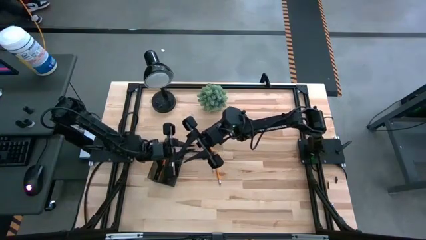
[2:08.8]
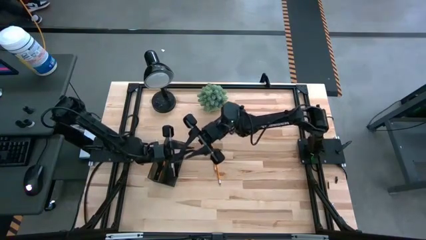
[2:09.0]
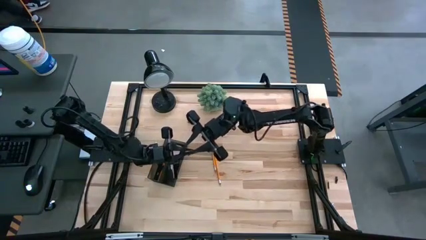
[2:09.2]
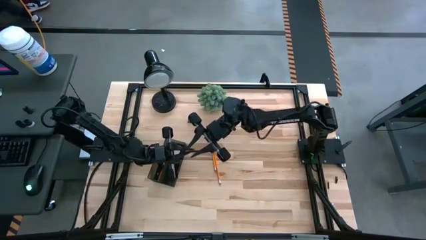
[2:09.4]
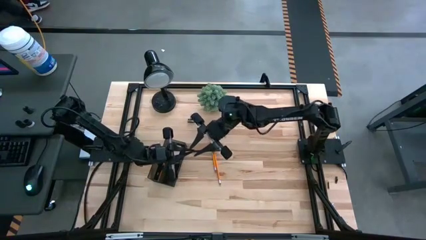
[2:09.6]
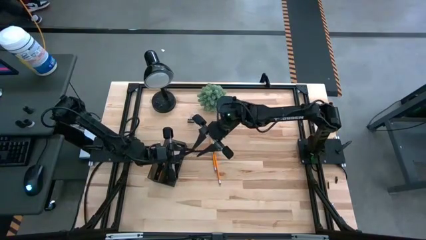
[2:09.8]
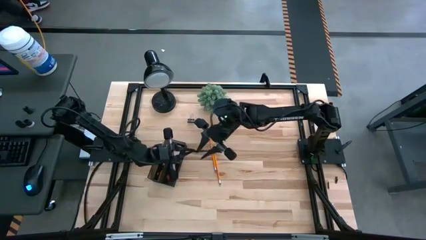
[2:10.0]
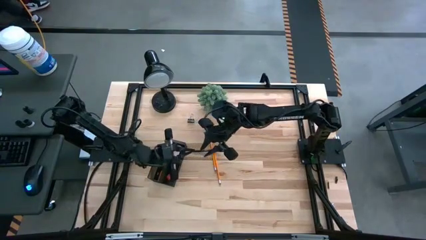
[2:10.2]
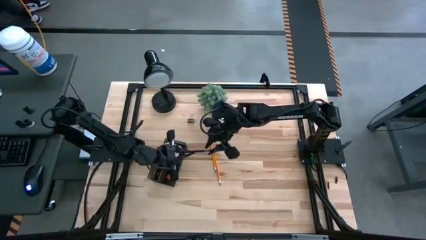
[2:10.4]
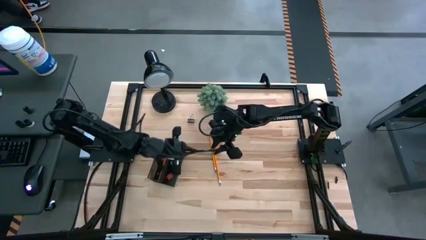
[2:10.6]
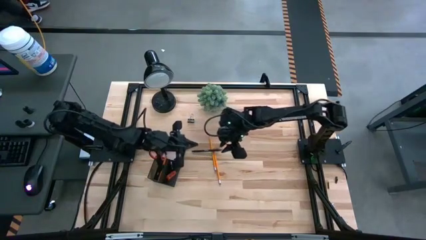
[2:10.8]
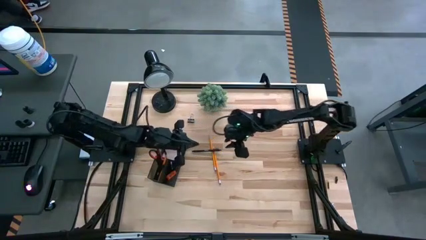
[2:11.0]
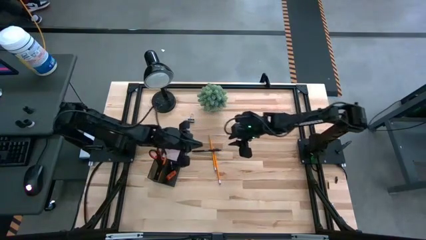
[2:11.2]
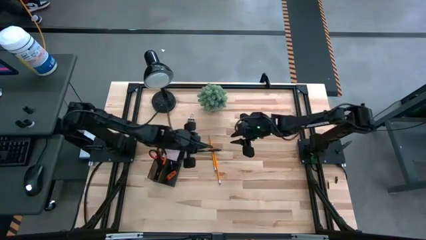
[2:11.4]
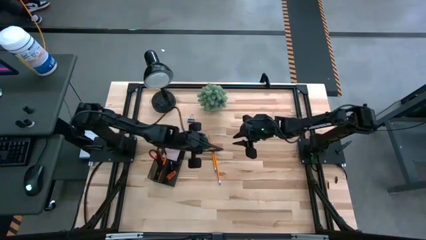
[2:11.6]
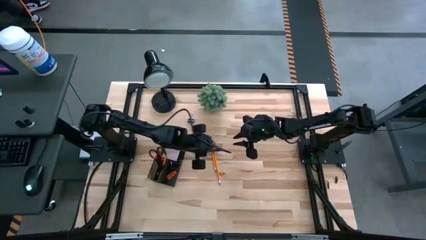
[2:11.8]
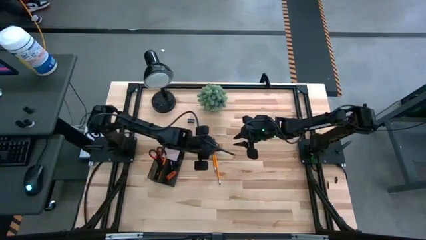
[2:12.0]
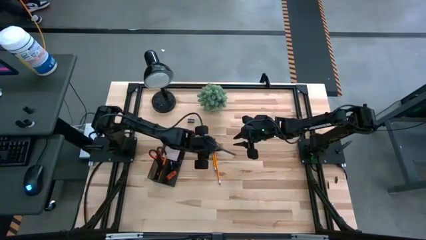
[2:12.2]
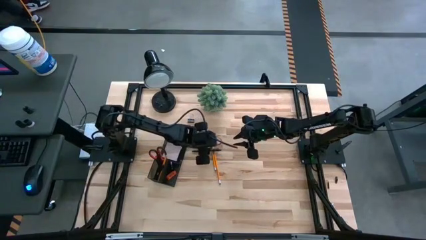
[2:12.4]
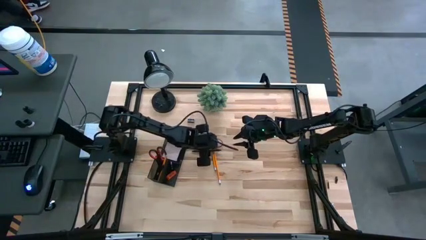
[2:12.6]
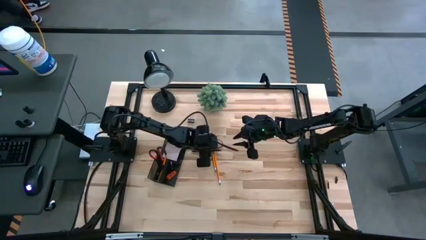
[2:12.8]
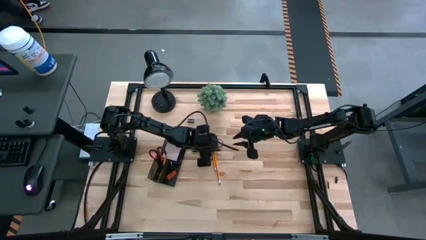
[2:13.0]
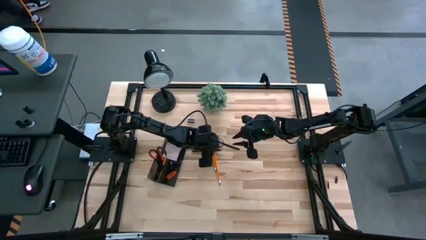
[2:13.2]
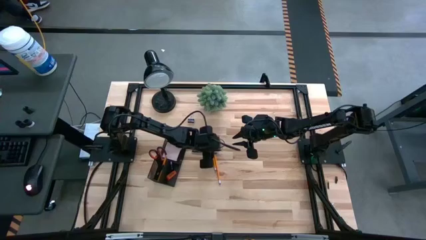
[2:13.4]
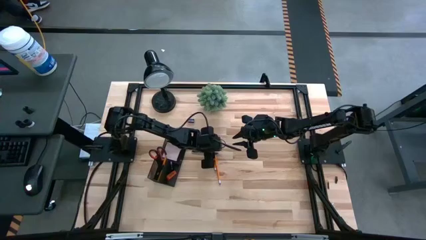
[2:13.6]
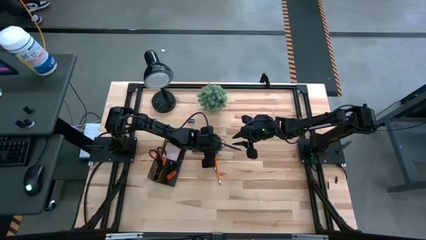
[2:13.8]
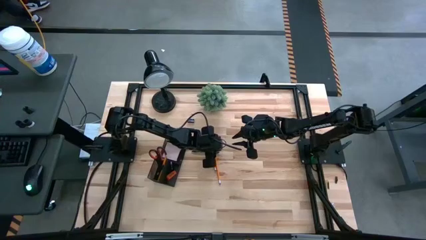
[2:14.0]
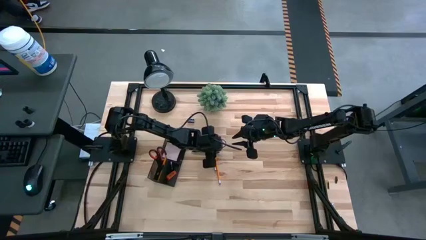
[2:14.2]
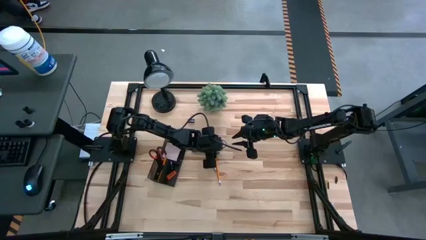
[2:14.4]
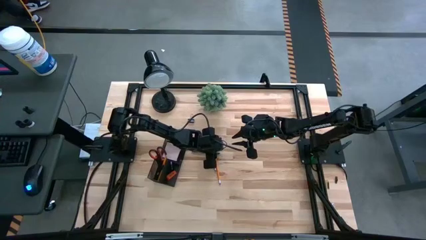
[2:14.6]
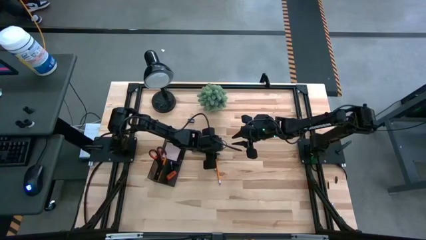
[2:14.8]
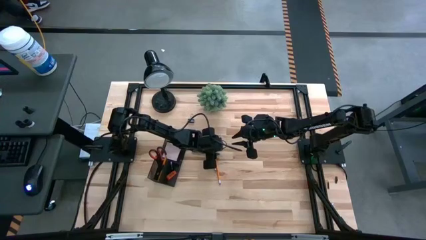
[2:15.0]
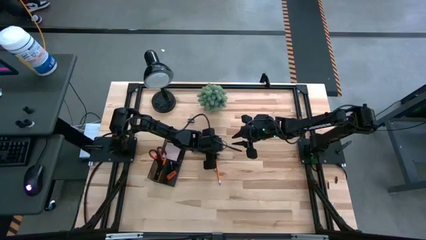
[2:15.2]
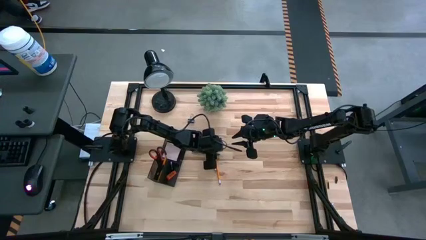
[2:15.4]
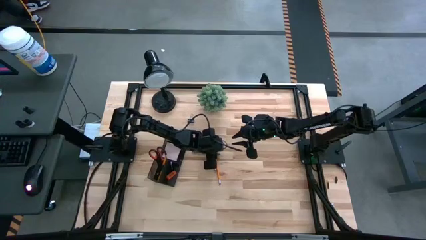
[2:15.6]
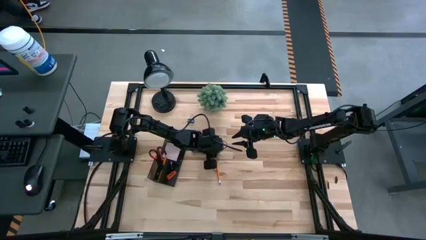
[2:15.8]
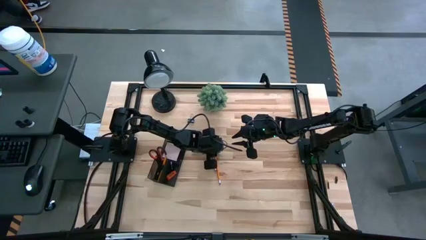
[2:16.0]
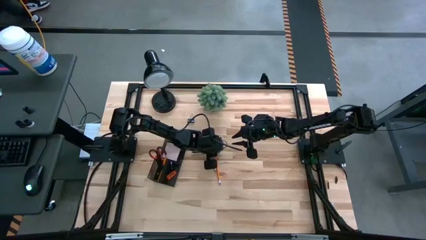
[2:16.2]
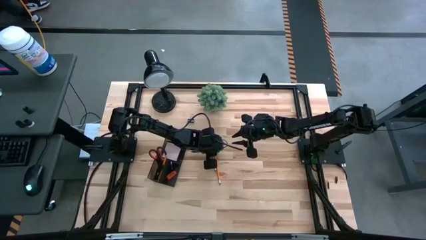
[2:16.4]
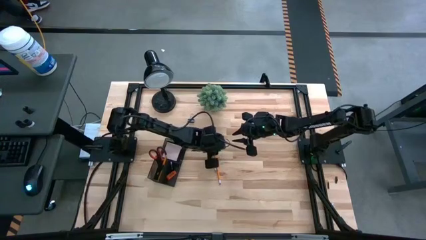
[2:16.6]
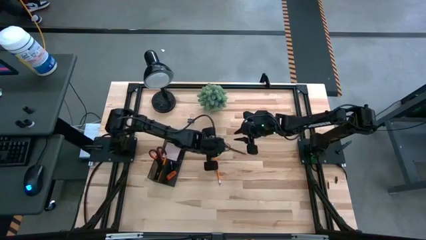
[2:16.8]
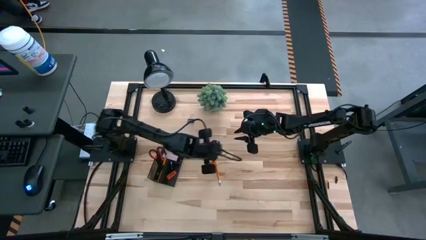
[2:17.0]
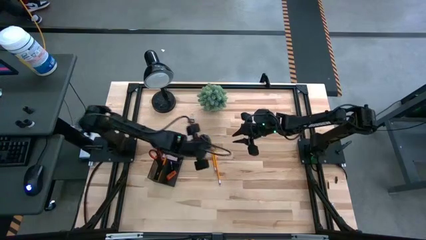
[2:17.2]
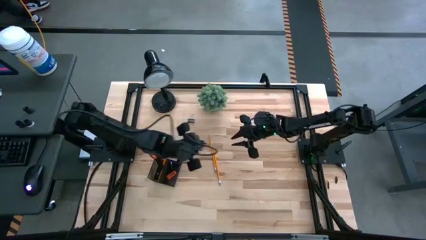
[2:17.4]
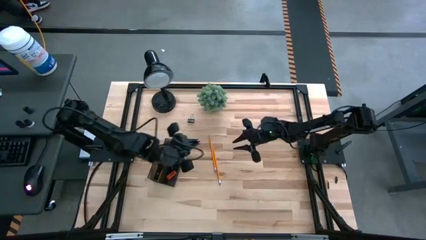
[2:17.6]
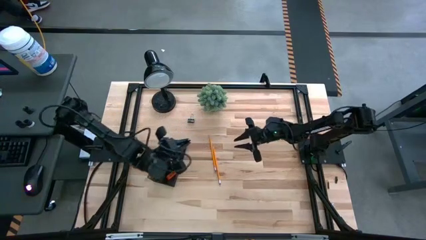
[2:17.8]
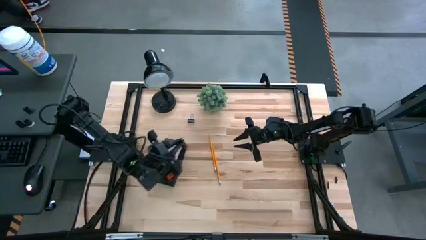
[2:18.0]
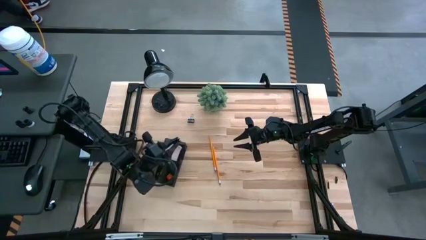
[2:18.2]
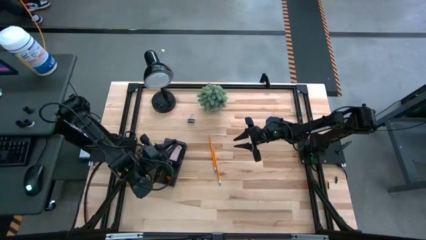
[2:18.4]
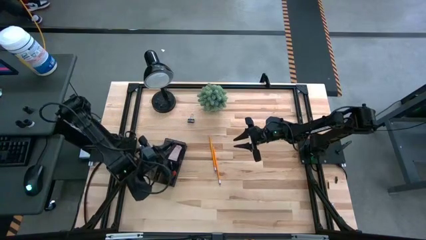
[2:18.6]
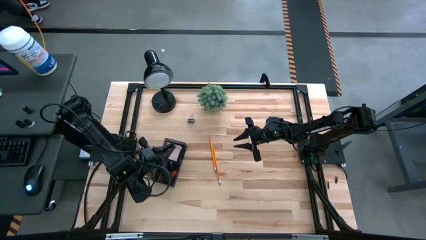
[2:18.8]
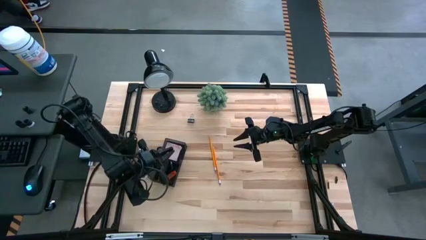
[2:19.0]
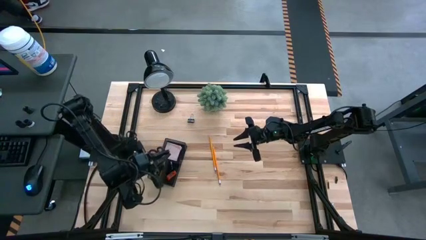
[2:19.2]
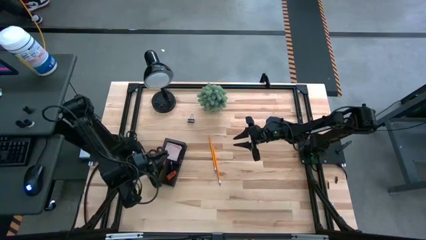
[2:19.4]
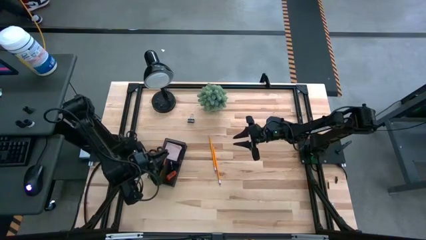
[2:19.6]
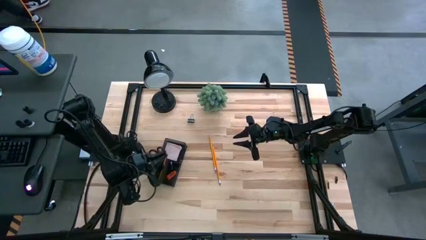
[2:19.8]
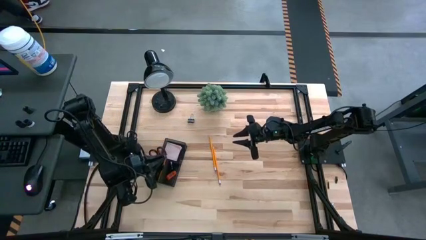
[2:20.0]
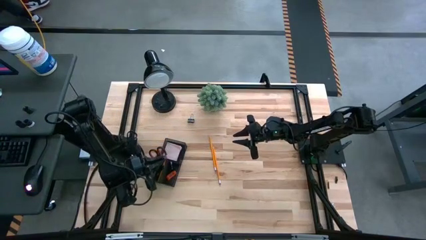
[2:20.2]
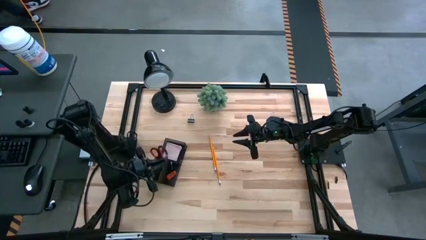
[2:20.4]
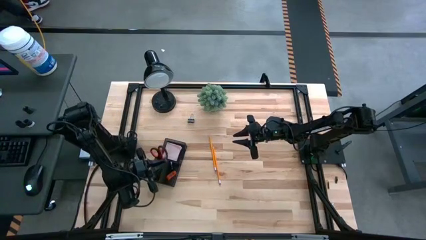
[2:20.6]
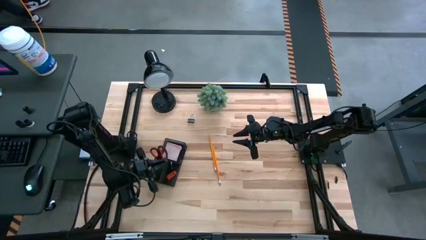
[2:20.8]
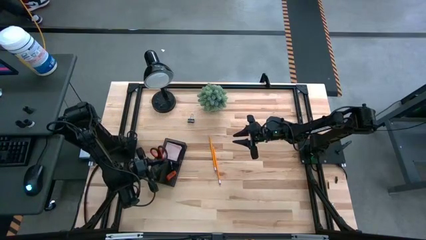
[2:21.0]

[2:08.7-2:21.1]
Task: Pick and place office supplies into organizer
Put the black pen into the desk organizer

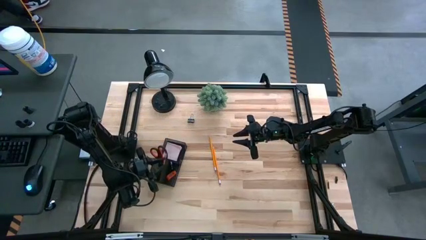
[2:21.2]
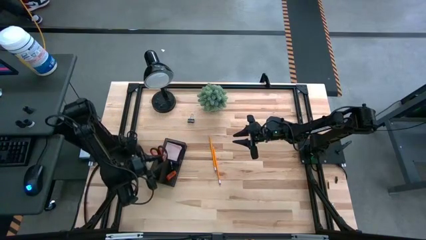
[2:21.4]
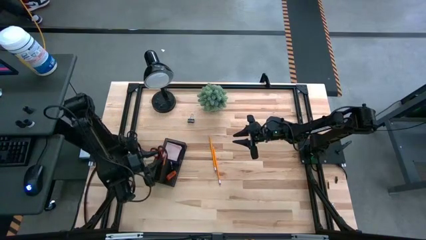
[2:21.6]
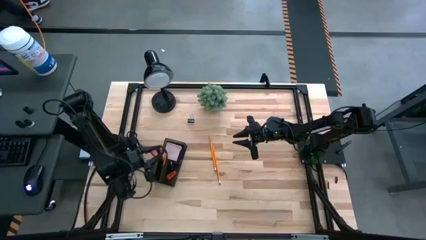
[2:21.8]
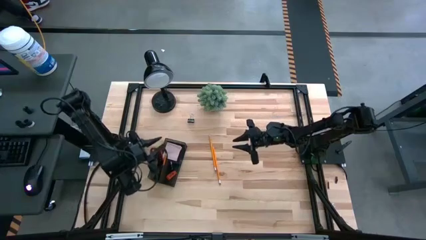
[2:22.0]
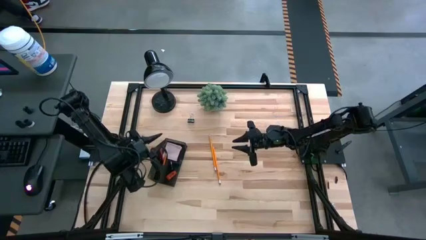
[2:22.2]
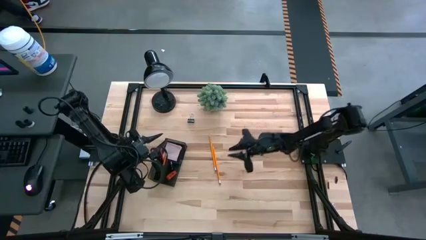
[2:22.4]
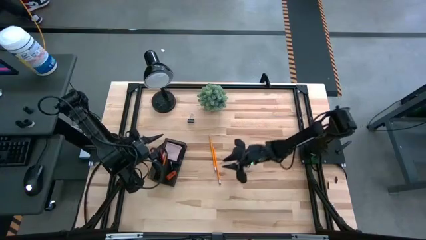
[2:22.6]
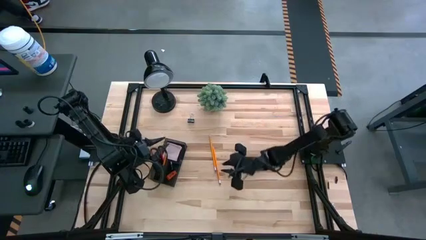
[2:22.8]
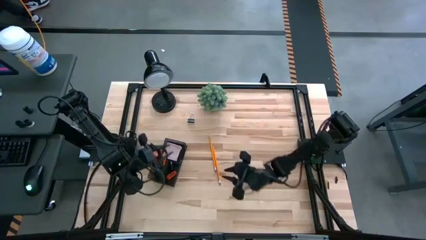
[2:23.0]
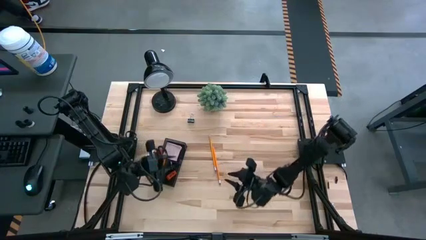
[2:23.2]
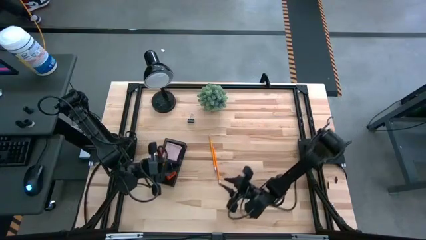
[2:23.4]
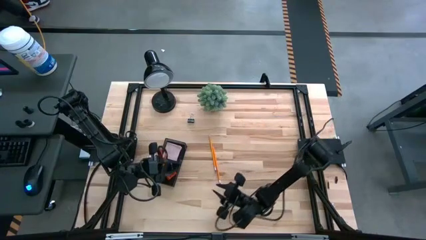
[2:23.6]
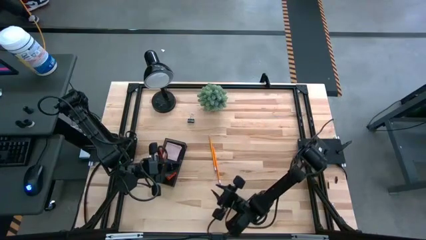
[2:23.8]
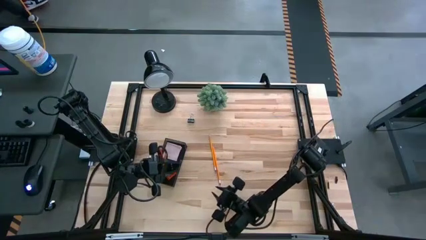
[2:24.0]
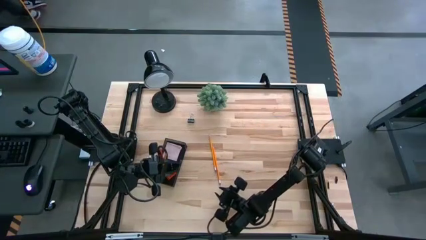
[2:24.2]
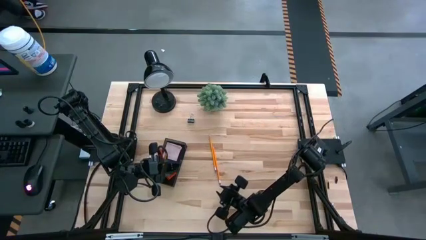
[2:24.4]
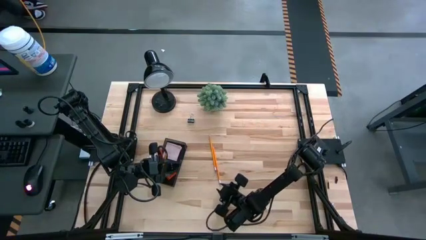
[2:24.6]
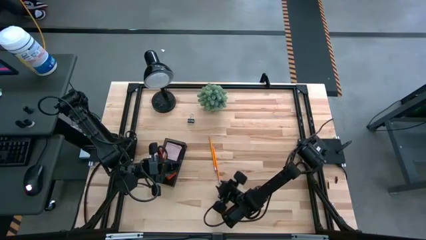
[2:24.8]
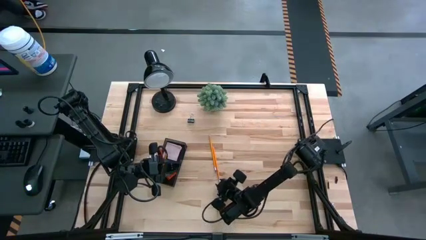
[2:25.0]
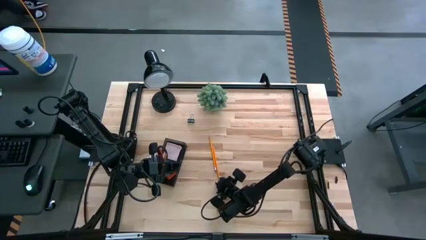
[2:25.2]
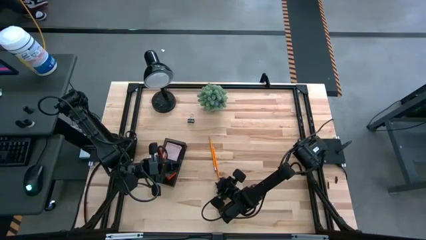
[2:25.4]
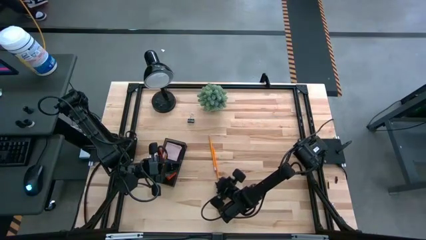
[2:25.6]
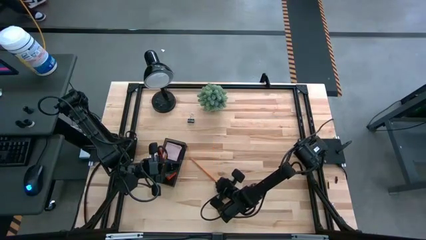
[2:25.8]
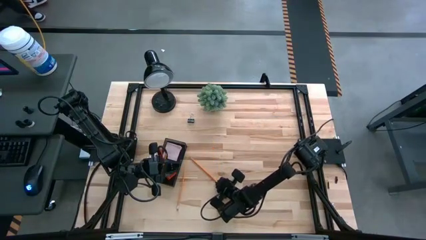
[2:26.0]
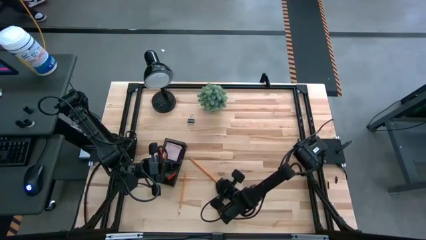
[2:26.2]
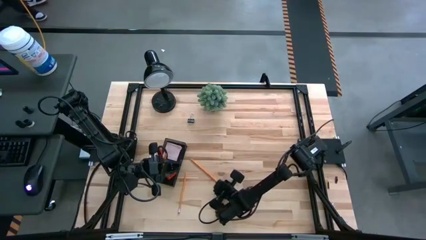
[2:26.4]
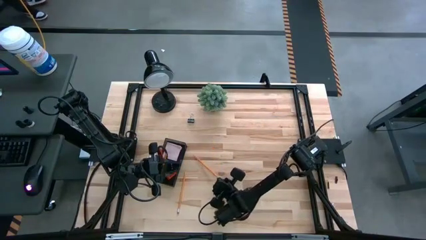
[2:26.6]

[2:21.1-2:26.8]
Put the right orange pencil into the desk organizer
